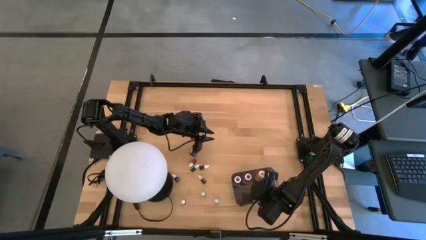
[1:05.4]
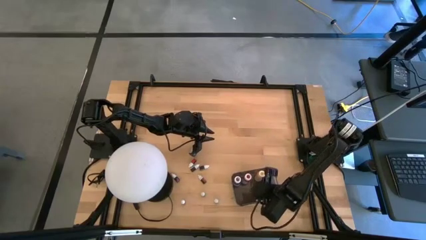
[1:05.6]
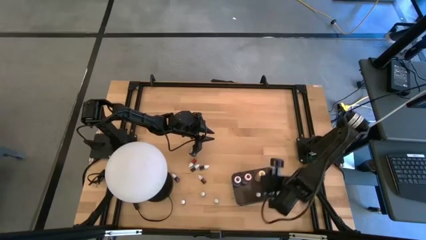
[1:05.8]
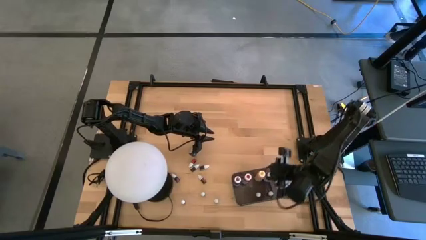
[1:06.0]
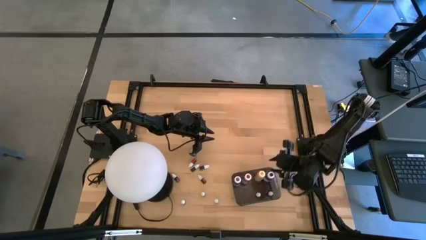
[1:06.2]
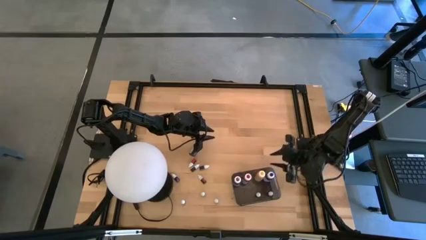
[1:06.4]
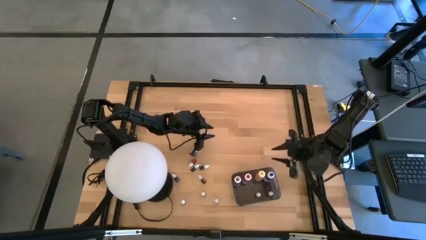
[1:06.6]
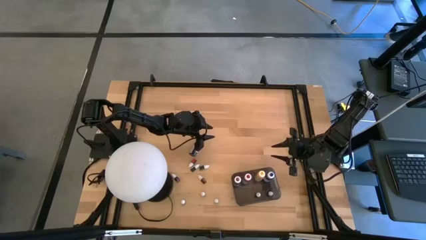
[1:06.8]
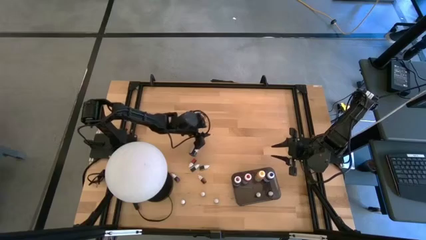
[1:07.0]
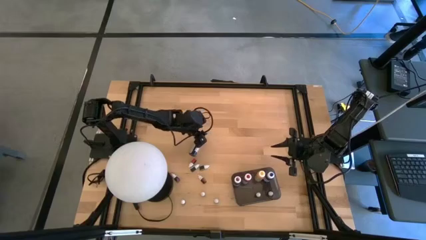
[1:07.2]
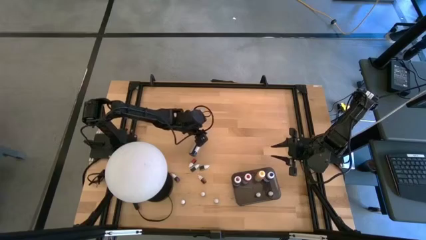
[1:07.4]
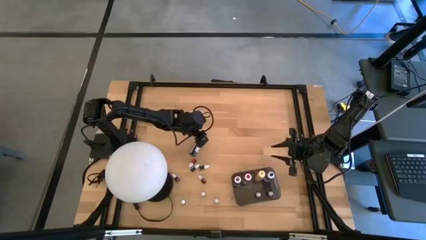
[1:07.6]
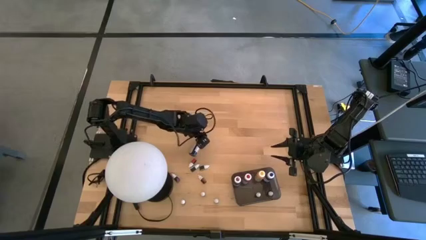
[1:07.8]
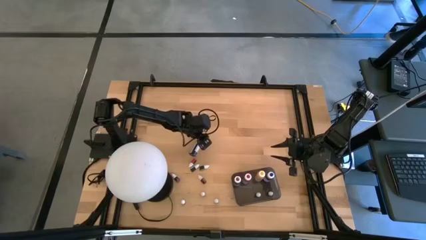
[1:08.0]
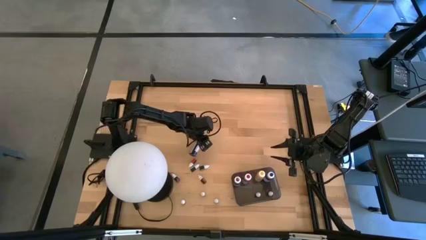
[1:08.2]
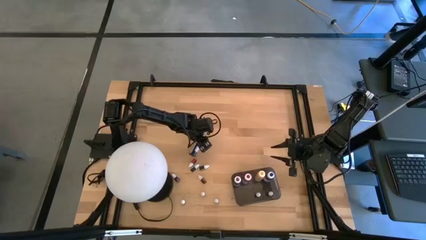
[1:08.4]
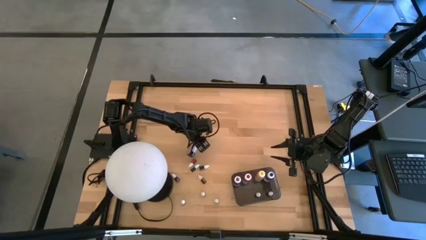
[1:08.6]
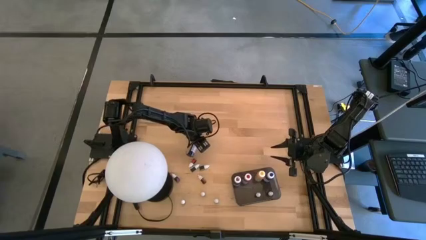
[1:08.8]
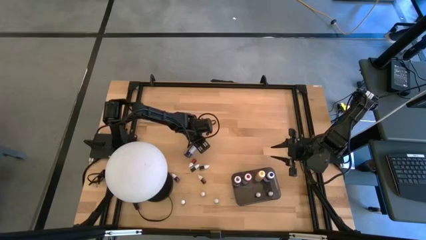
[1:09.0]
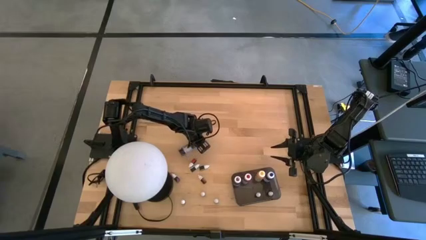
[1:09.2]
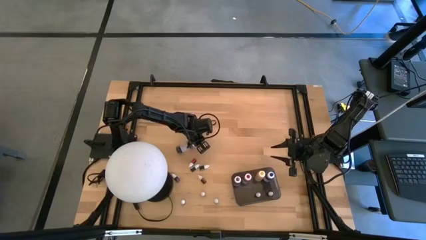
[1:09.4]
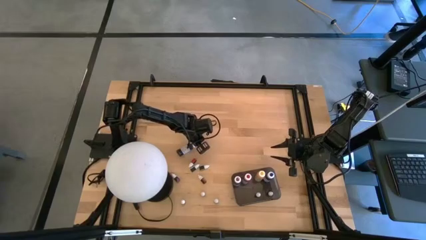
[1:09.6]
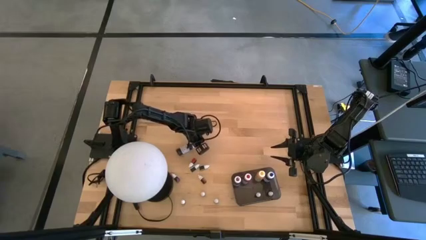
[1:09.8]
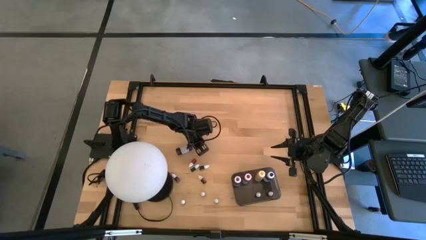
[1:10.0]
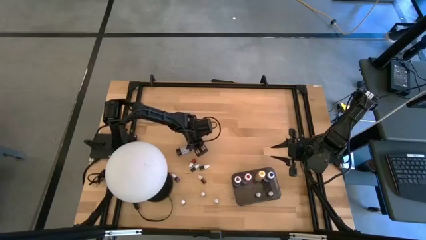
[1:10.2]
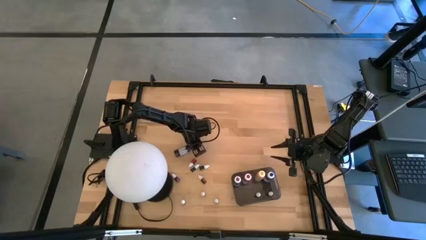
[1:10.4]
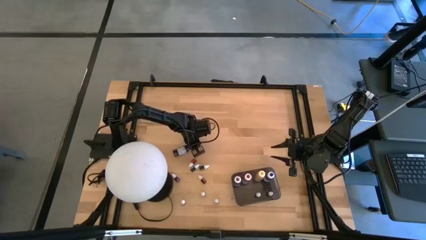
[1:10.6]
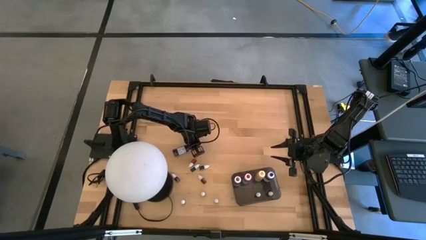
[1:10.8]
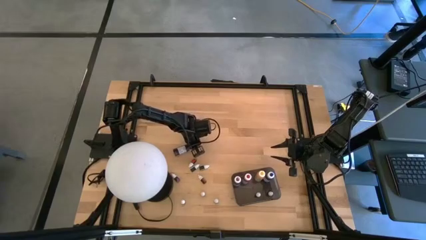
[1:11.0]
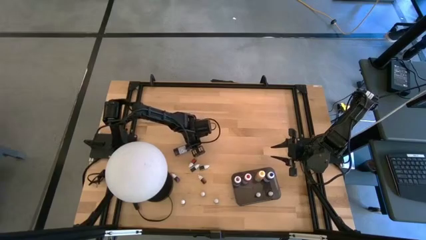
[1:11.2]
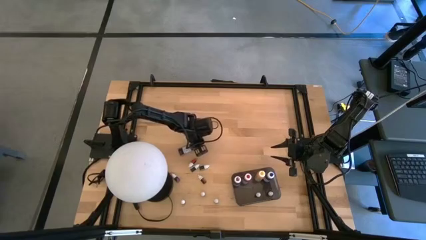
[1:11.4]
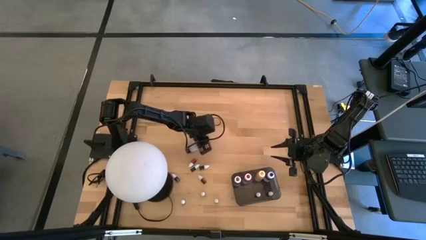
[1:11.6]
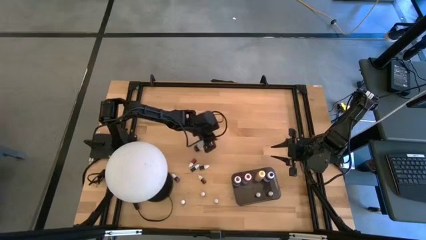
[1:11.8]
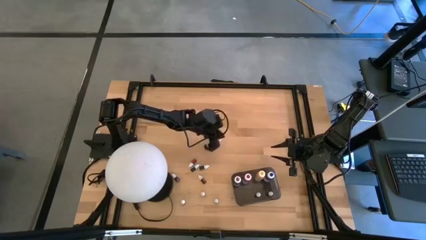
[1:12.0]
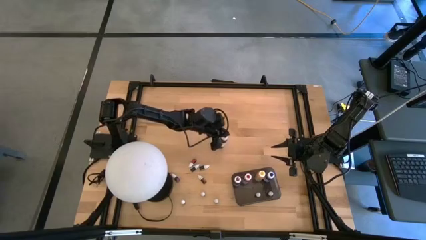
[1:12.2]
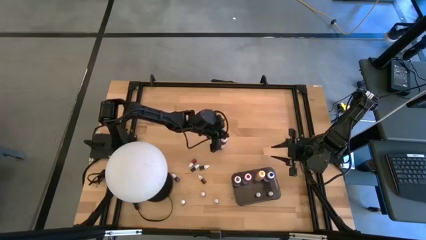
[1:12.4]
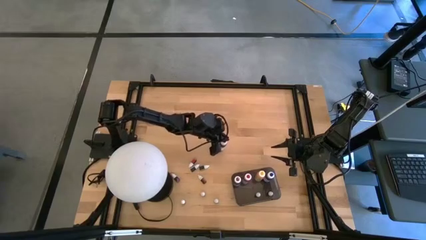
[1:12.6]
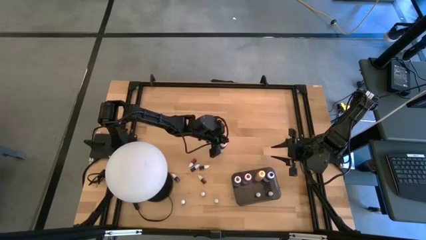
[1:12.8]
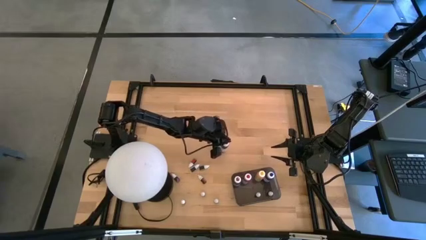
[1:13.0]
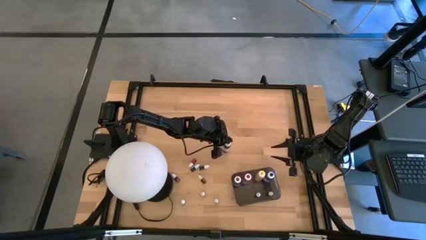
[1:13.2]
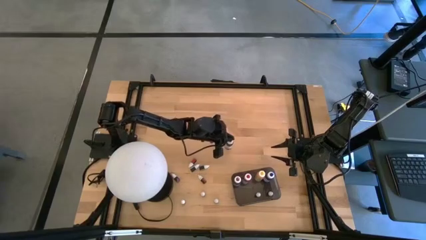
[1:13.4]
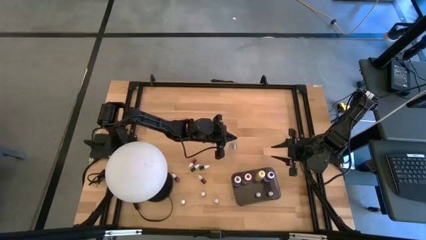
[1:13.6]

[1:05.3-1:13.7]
Task: Pick & Place food coloring
Put the large black food coloring bottle into the bin

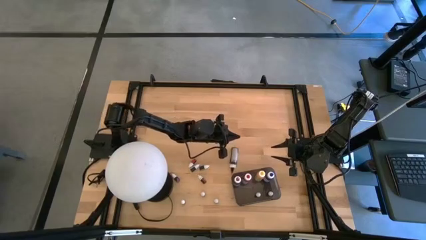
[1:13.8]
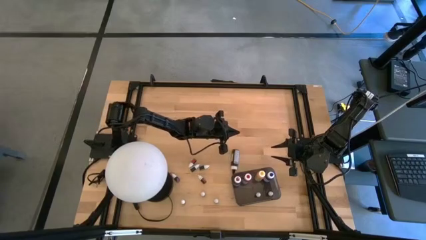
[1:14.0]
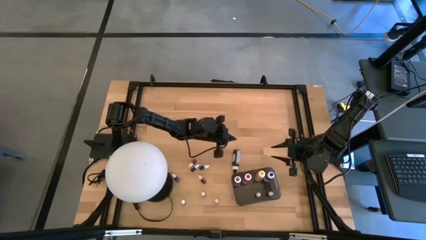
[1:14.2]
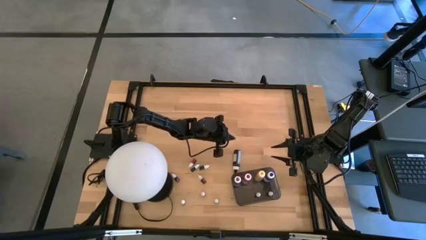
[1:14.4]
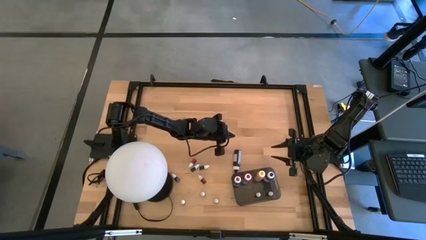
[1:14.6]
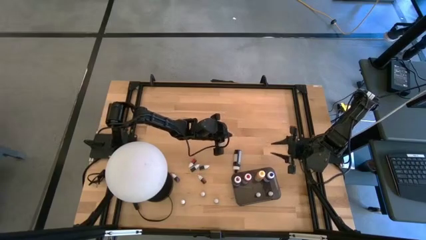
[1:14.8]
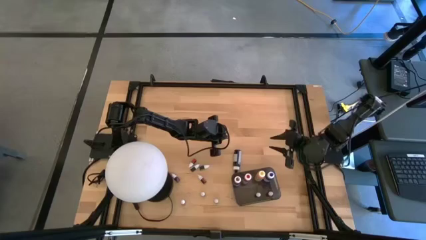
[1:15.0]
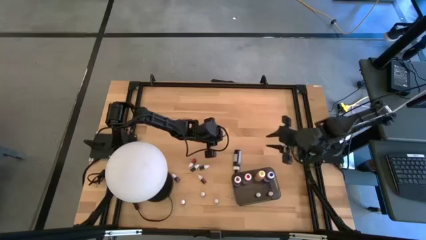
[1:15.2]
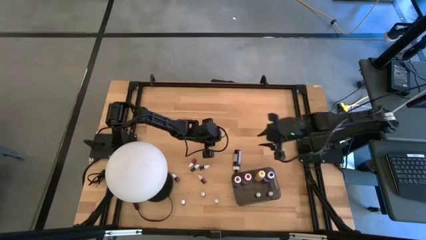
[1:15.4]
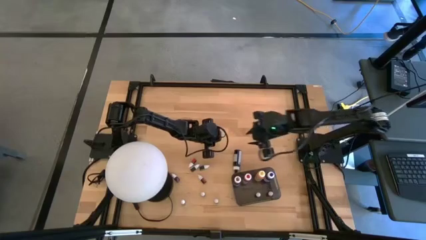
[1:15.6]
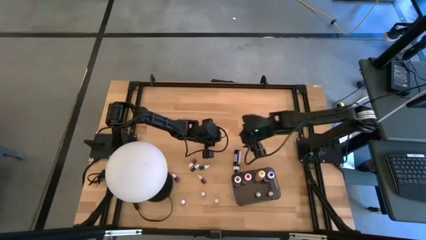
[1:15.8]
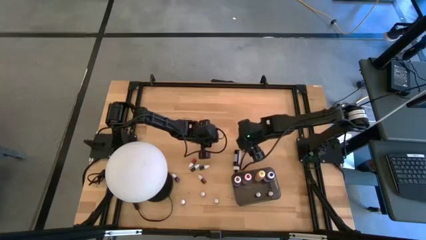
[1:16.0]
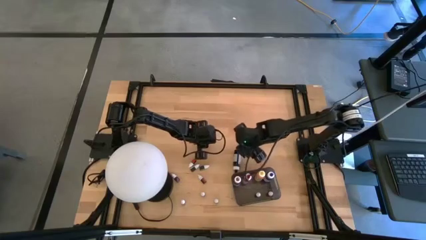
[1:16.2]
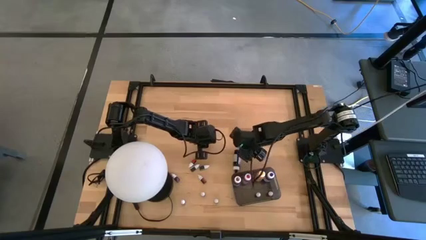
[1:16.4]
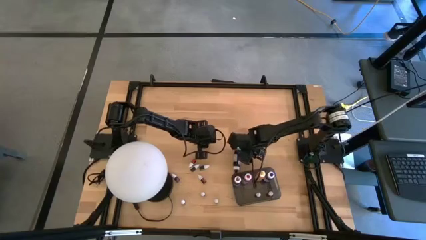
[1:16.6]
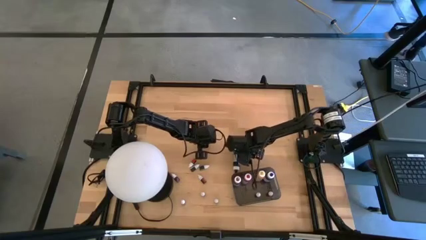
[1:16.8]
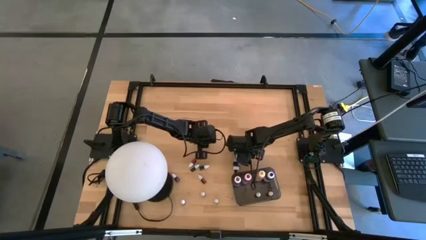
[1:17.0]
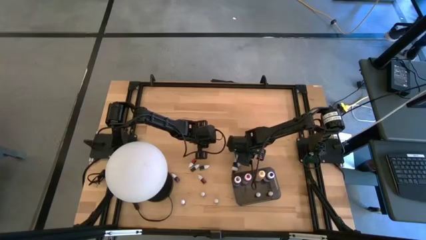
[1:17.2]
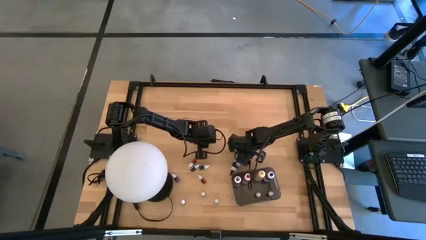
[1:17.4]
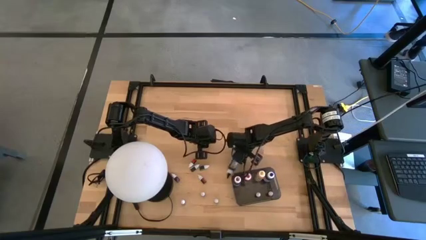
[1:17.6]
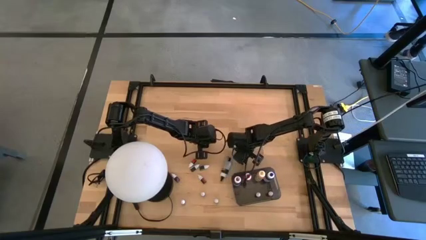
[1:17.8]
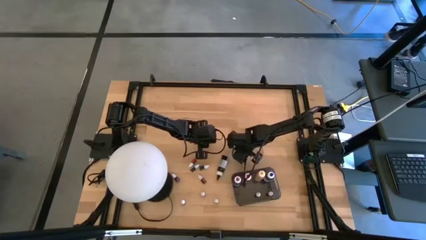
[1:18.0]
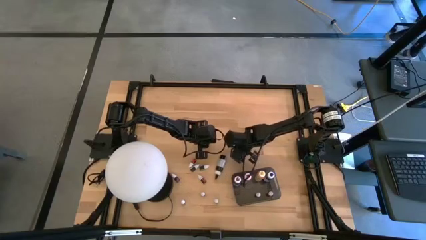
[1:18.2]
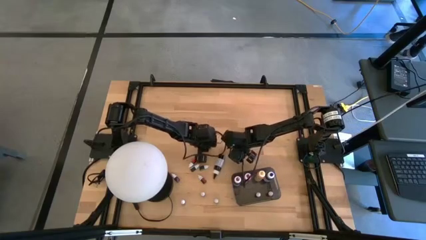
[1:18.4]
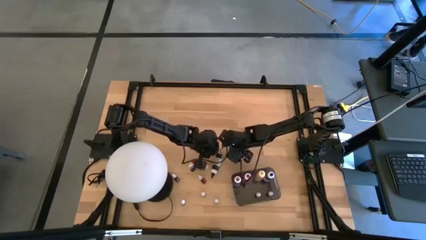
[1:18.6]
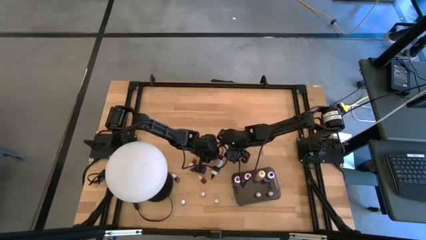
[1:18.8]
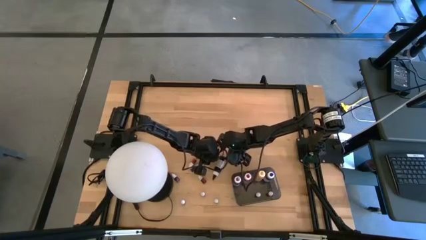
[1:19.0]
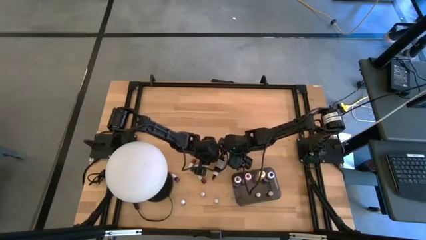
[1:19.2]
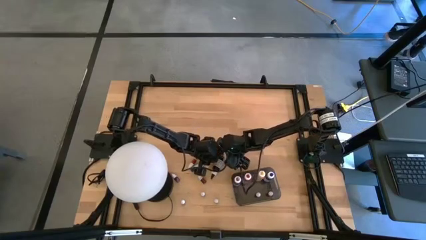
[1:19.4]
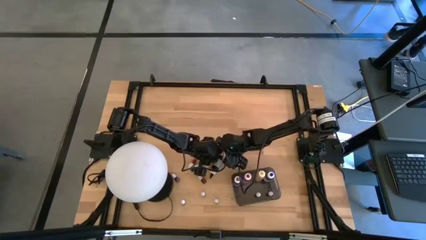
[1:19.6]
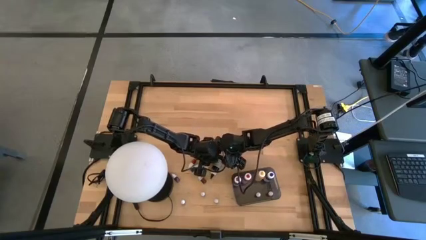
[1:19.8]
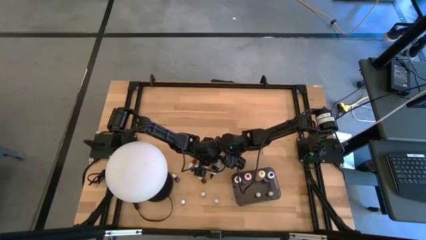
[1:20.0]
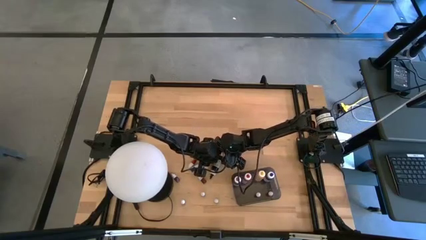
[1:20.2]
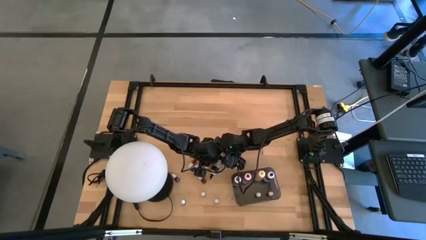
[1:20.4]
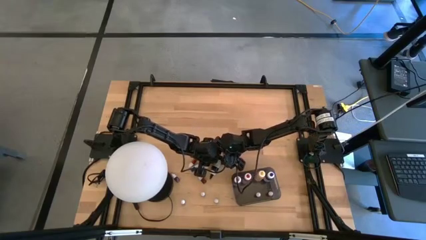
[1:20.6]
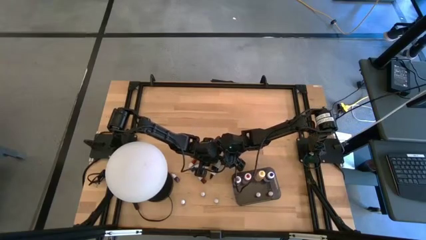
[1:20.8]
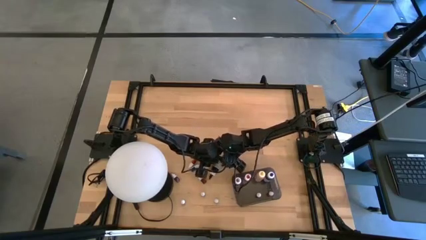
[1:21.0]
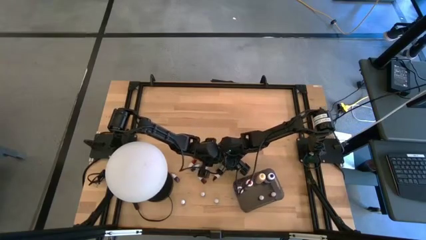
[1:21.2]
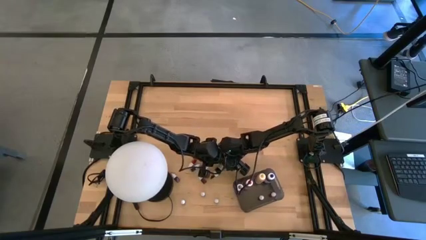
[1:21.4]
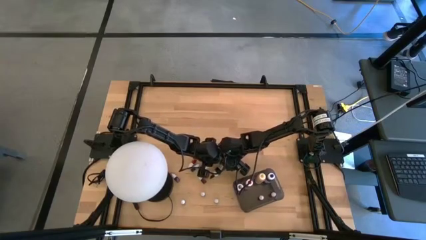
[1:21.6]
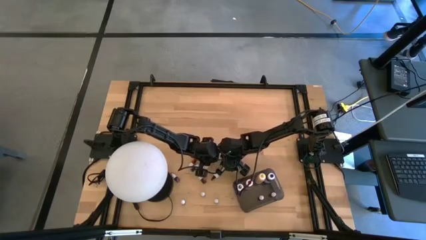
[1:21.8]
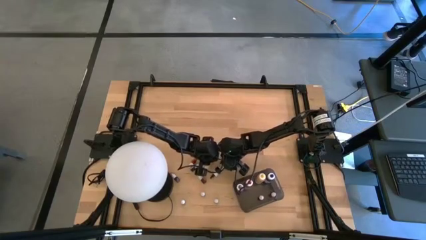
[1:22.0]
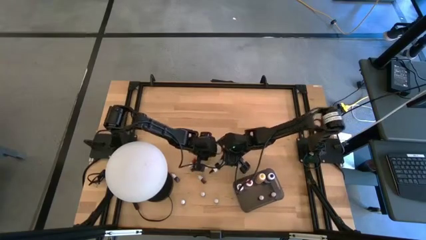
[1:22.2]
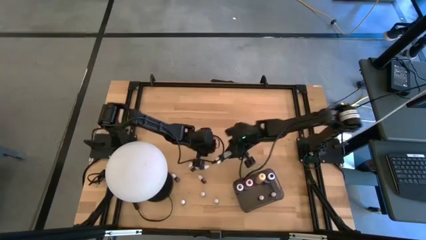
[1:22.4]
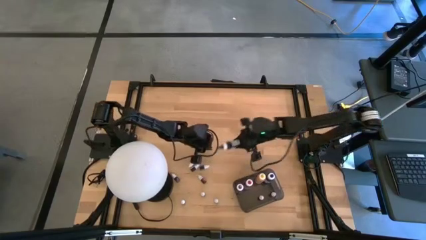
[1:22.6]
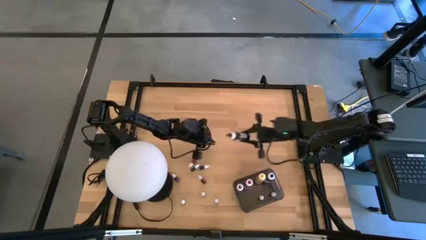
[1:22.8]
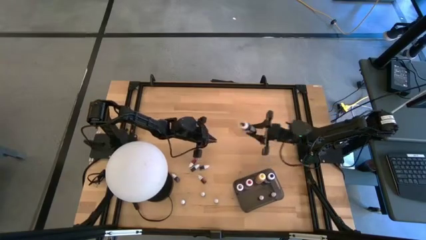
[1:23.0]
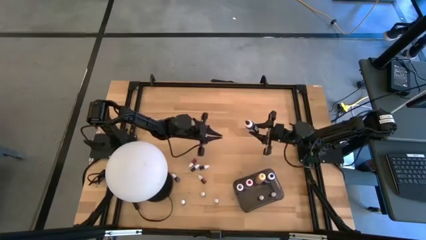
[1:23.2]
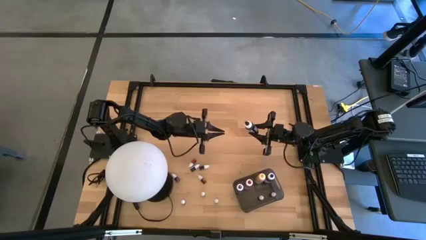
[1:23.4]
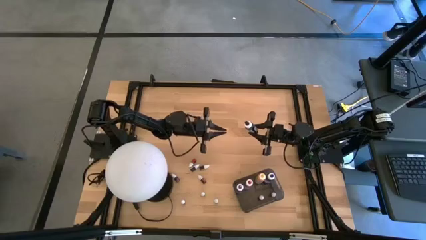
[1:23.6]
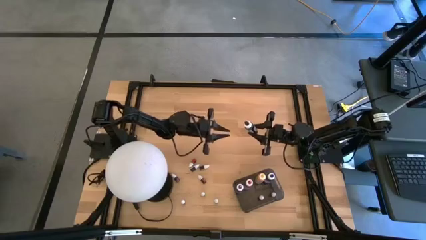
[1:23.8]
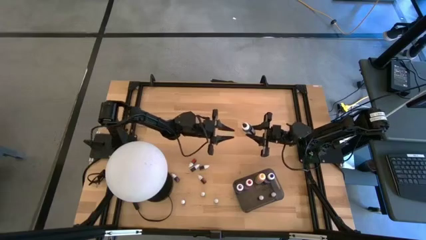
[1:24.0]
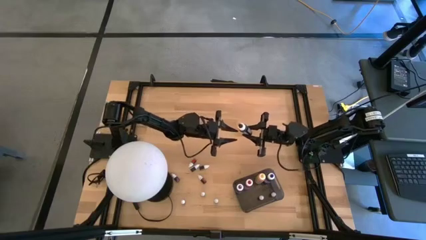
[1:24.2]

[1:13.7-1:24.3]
Put the large black food coloring bottle into the bin
